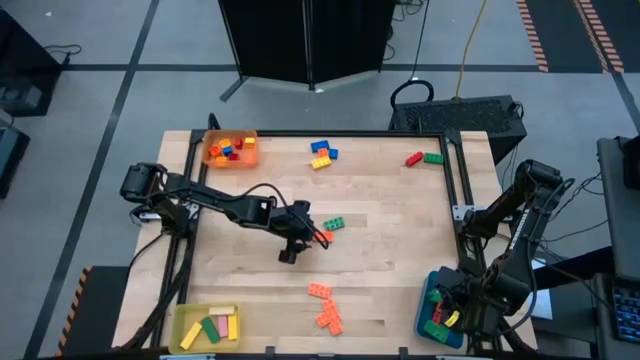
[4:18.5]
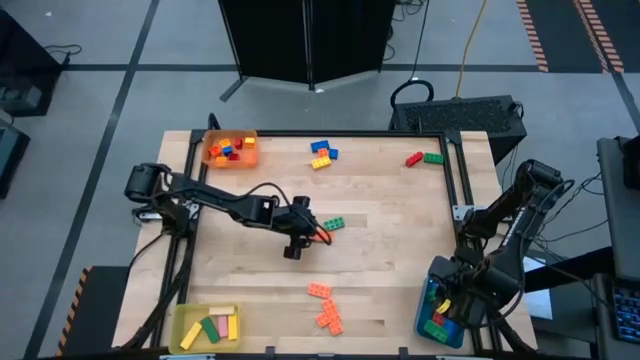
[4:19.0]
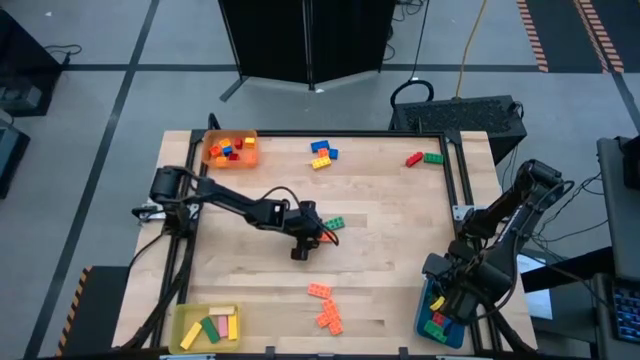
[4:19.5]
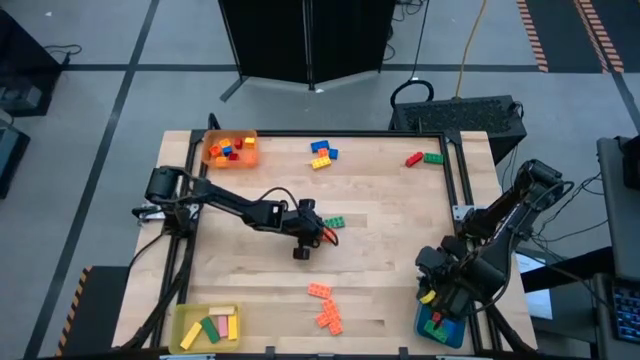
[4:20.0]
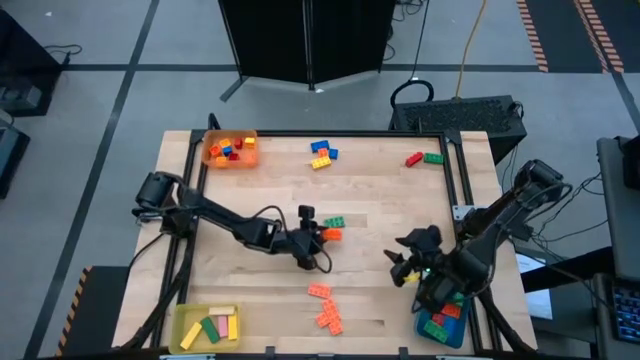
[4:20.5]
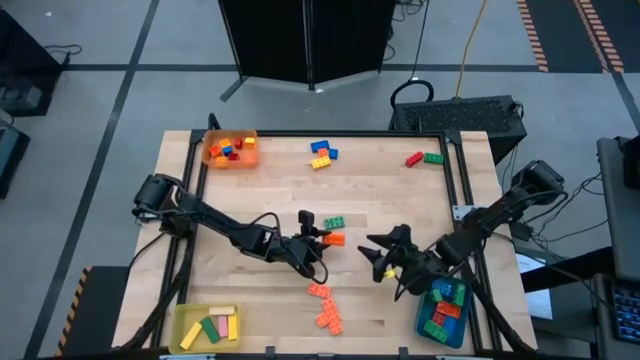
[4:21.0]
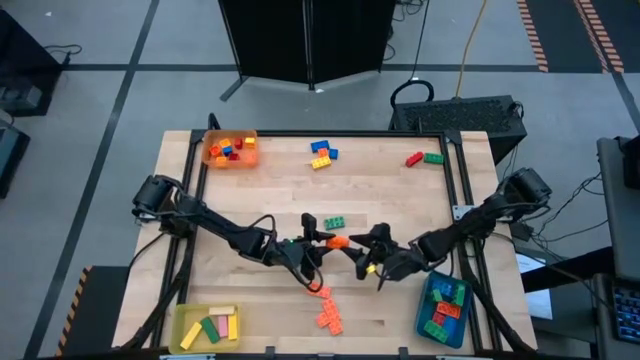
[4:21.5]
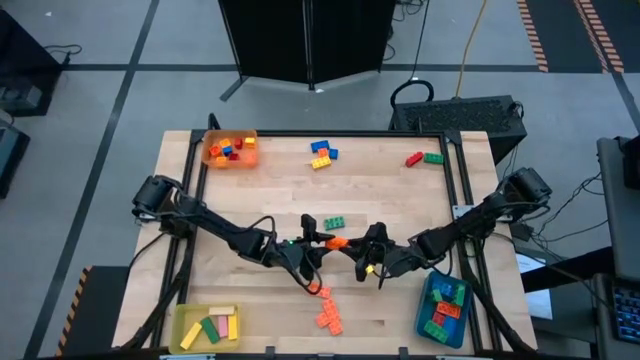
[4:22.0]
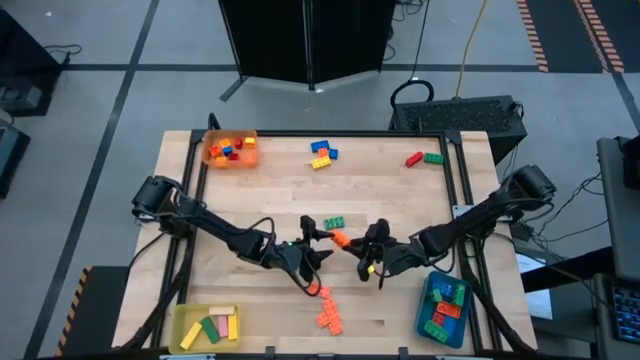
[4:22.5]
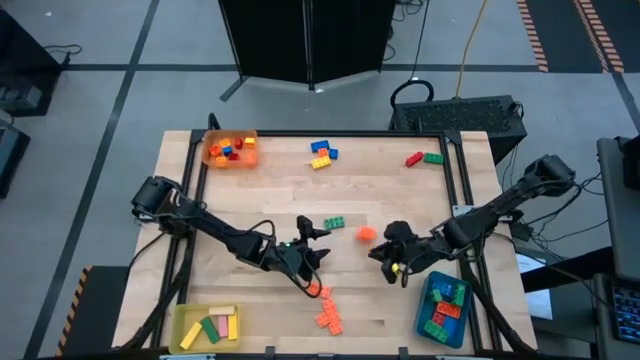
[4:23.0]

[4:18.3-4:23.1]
Task: Sort blocks by size
Put the orange 8 stud game piece into the blue bin

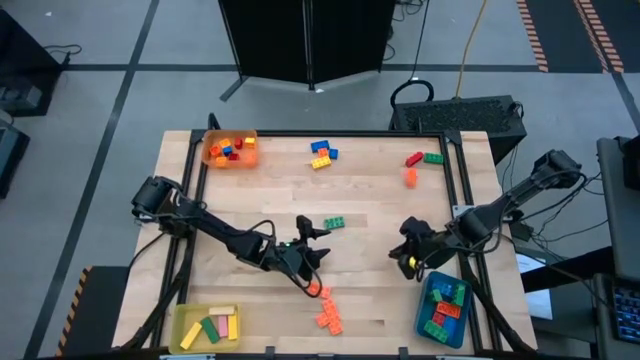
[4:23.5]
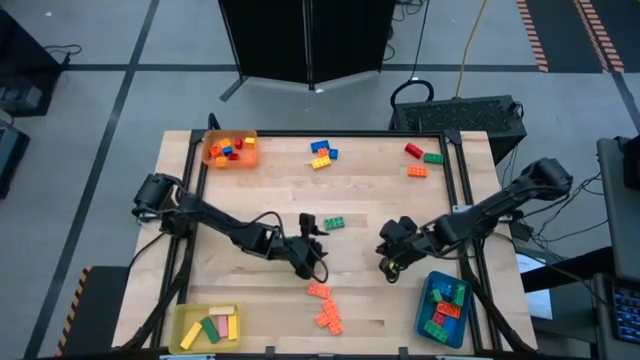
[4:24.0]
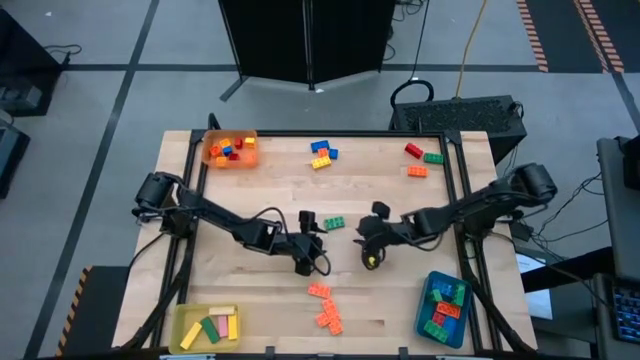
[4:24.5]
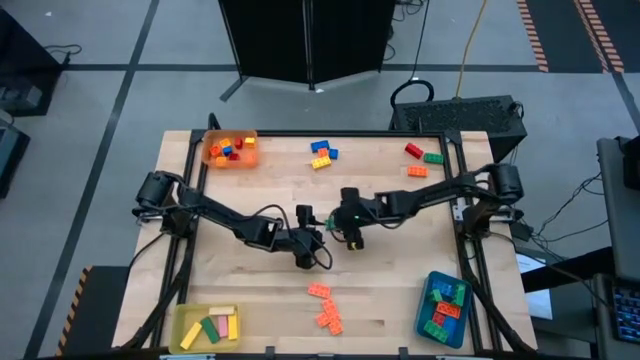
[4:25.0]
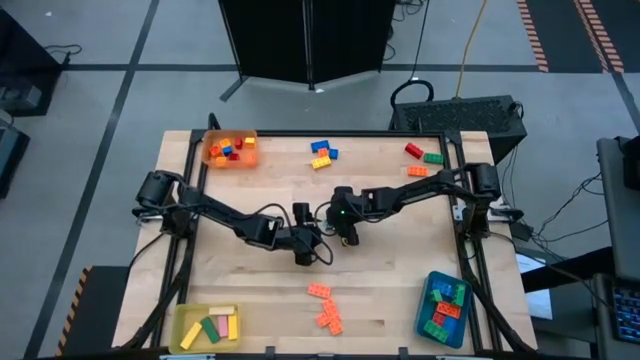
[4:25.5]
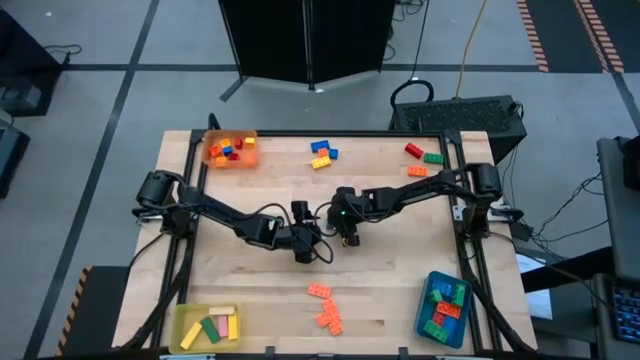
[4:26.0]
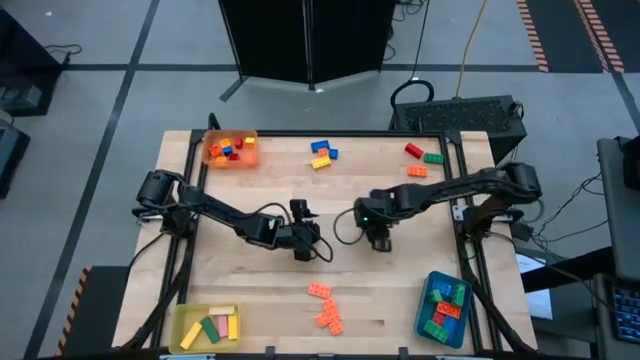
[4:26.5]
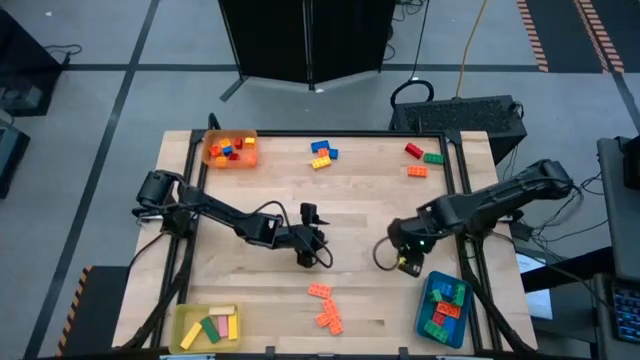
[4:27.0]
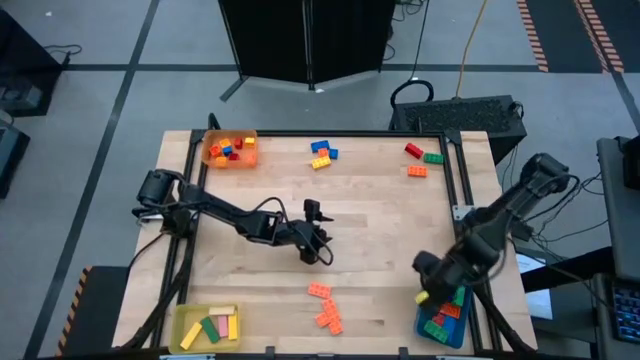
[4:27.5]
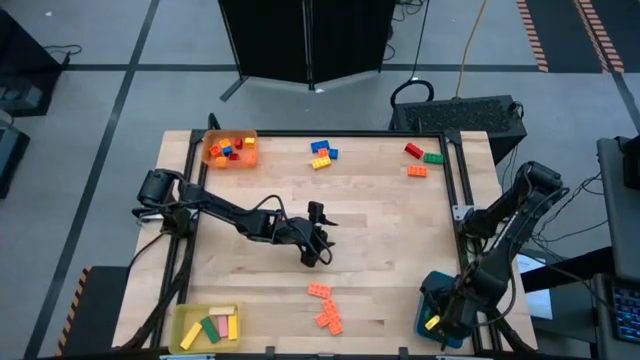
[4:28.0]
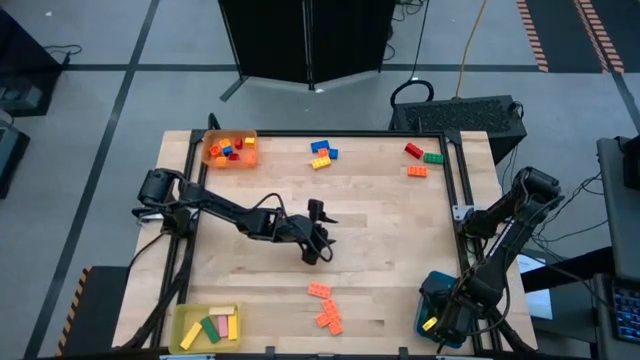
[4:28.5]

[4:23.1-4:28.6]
Put the green 8 stud game piece into the blue bin

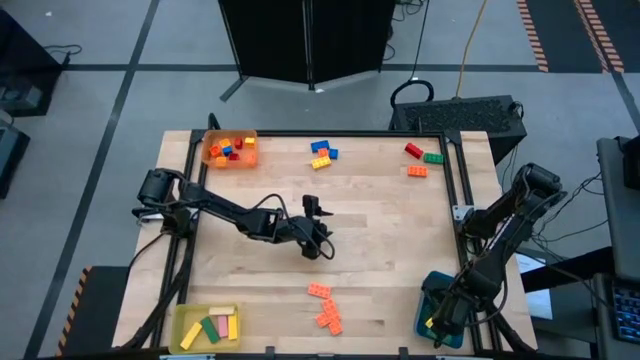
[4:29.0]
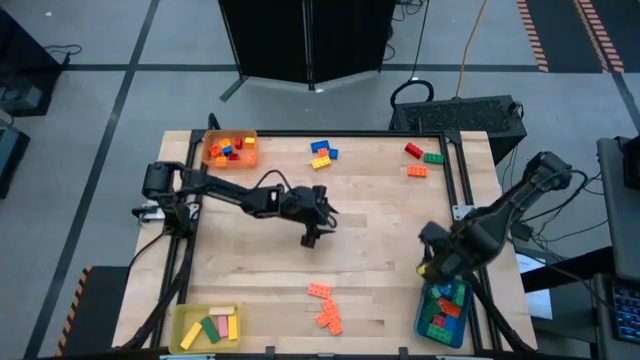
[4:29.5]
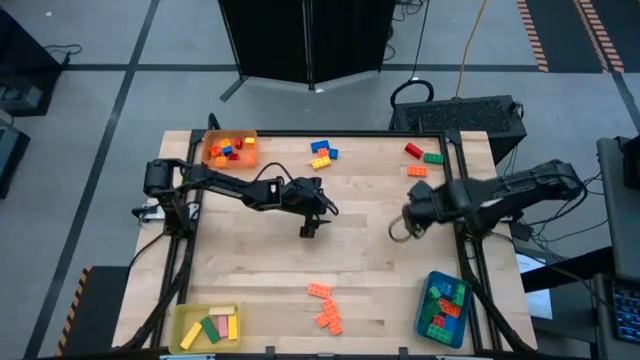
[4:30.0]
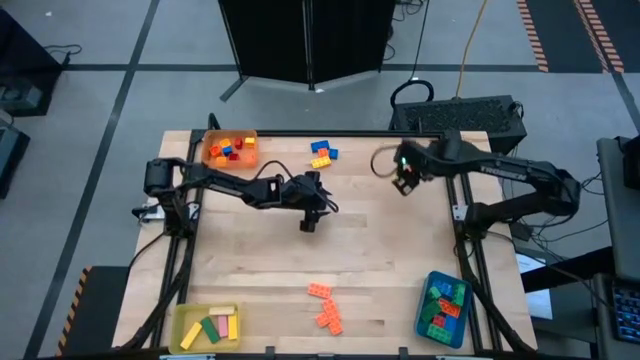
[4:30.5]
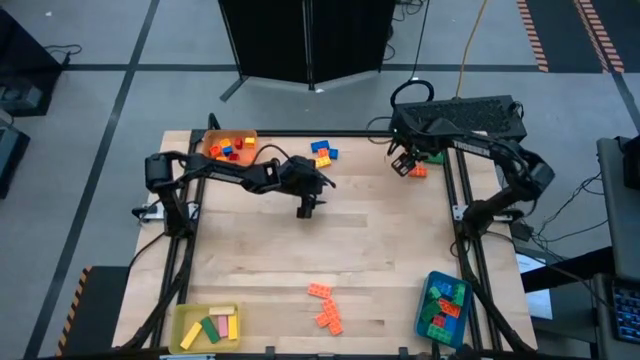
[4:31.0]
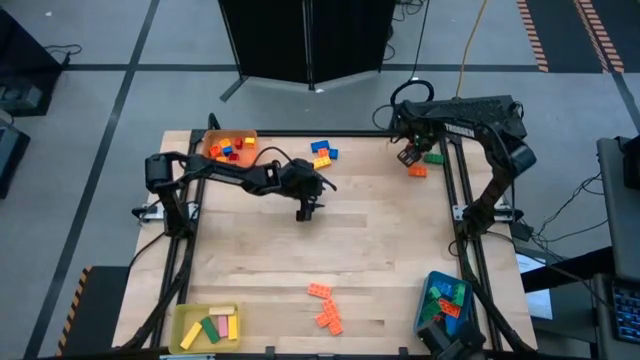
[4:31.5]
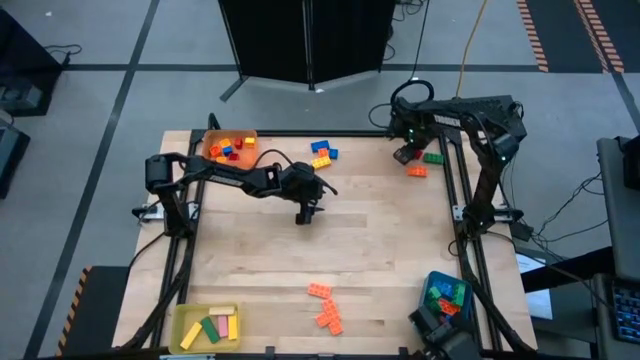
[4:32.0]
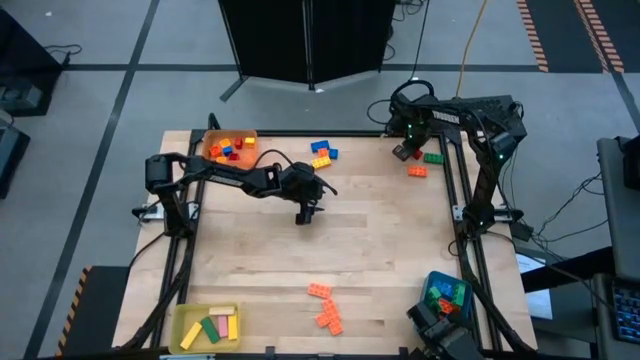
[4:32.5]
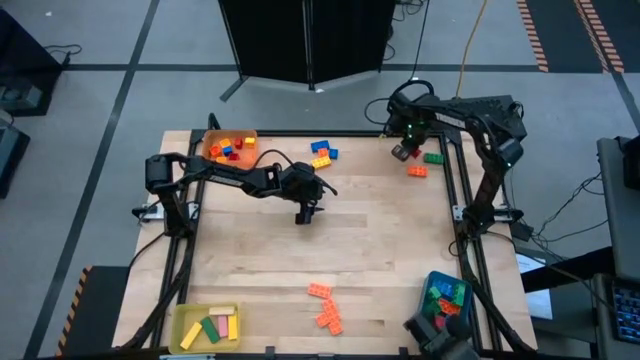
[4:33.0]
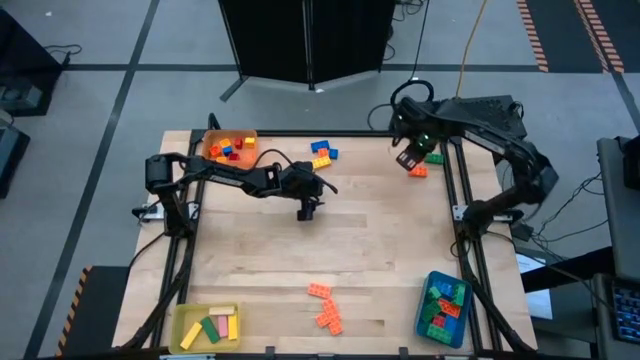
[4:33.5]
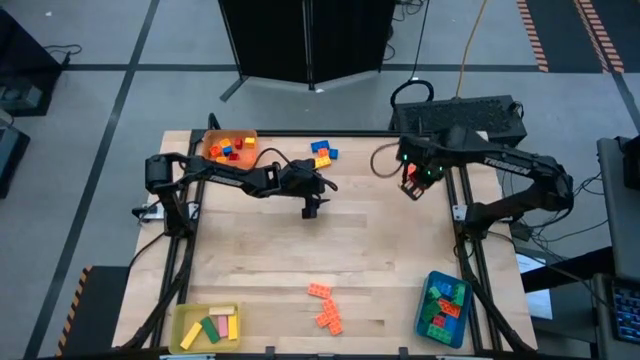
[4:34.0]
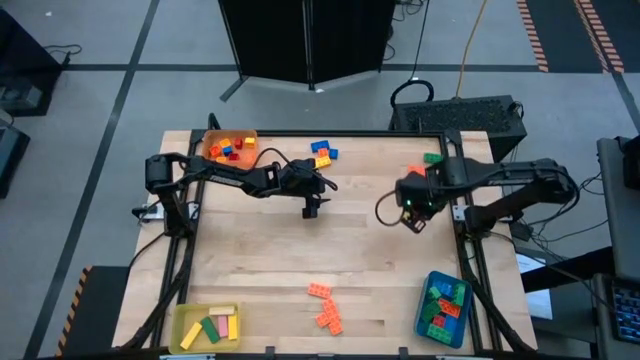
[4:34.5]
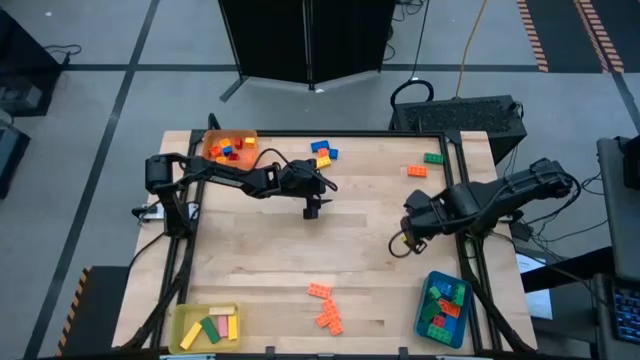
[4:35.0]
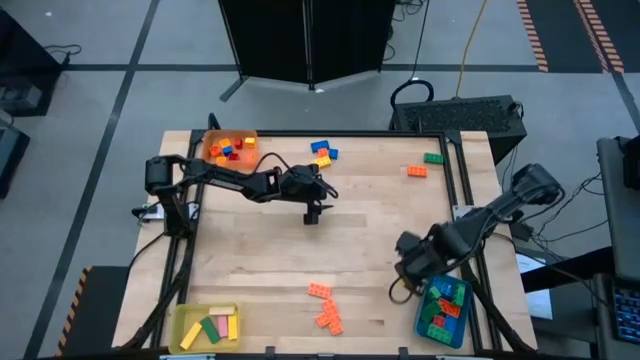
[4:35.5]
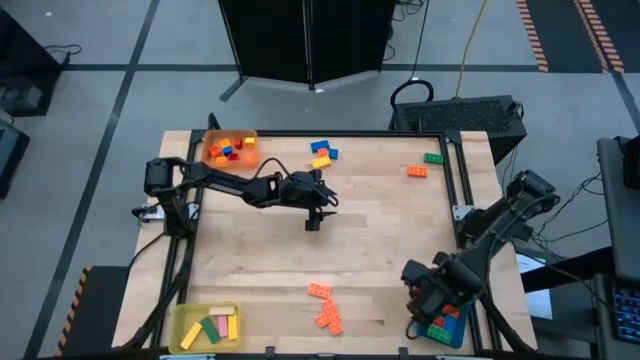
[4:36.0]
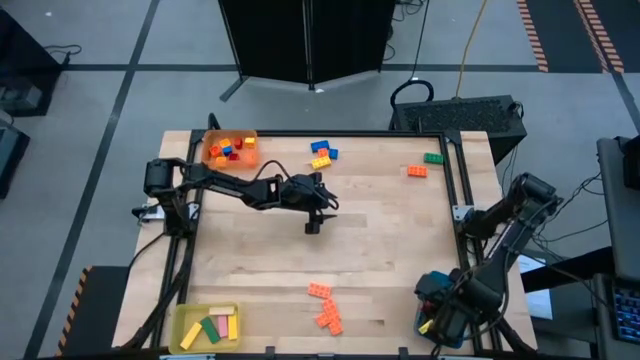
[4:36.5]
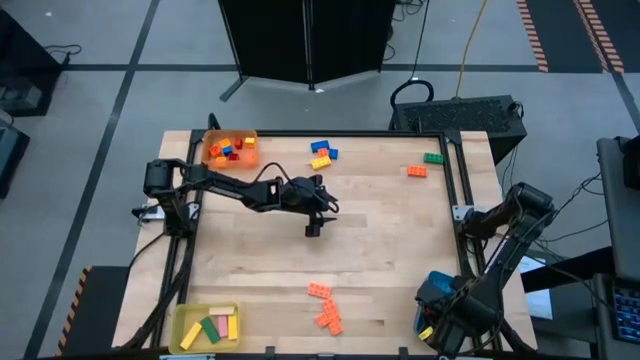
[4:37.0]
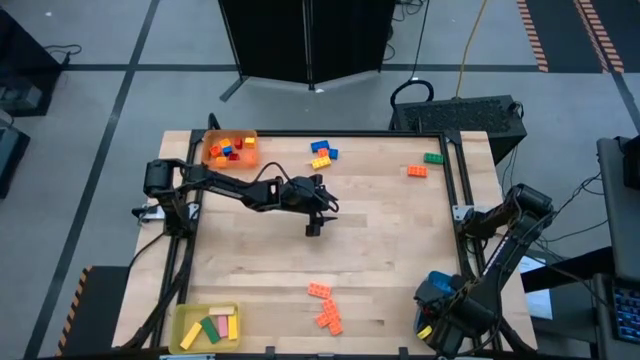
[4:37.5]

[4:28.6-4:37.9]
Put the red 8 stud game piece into the blue bin

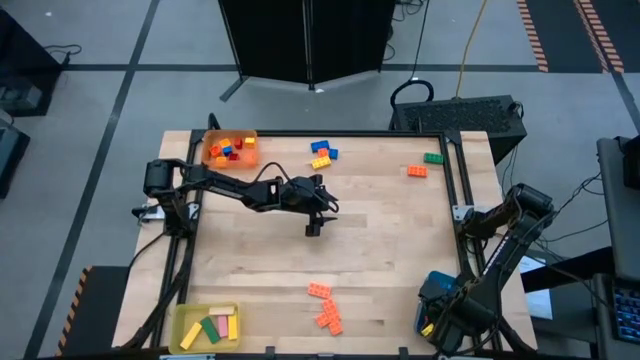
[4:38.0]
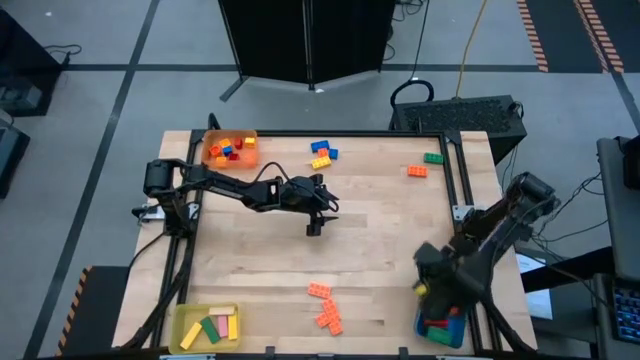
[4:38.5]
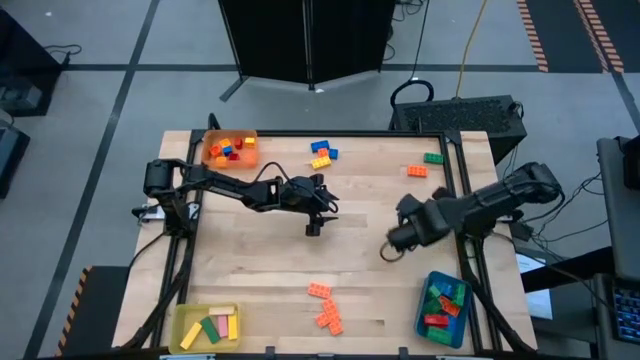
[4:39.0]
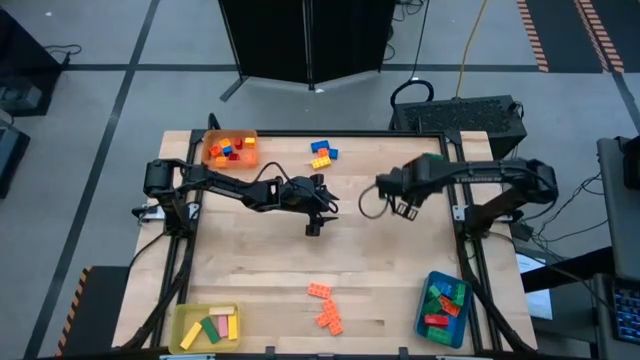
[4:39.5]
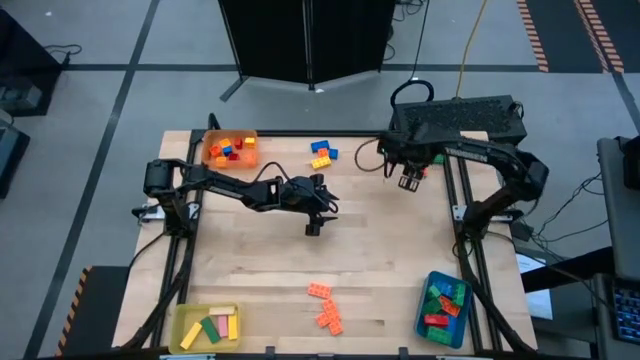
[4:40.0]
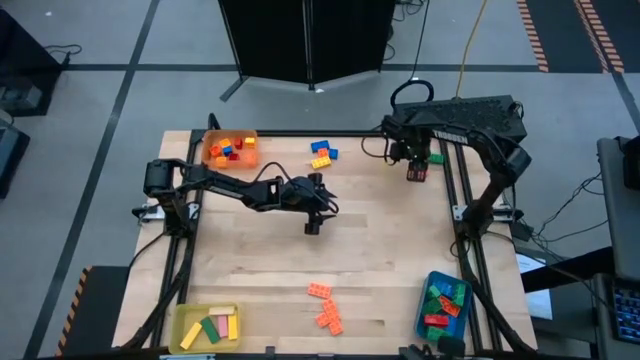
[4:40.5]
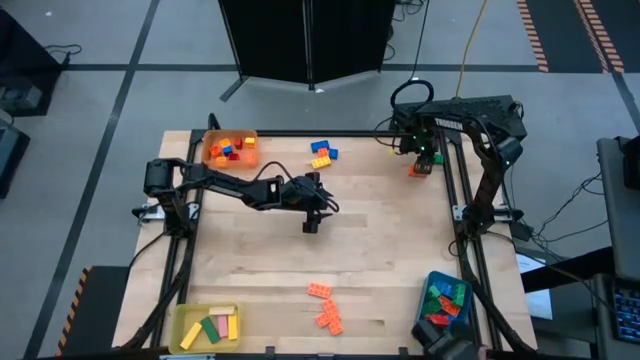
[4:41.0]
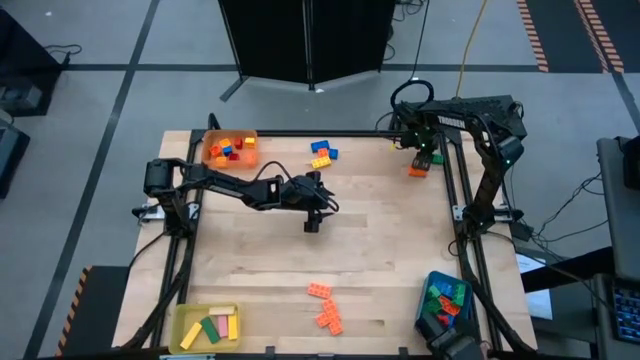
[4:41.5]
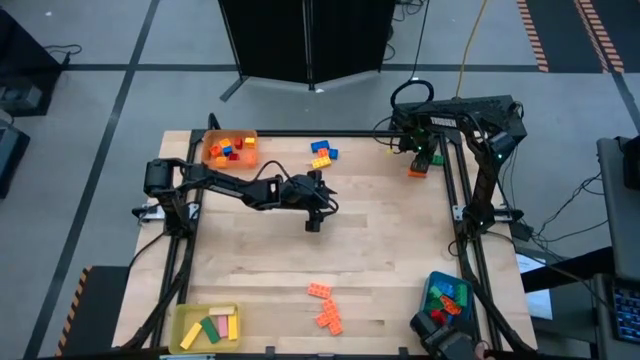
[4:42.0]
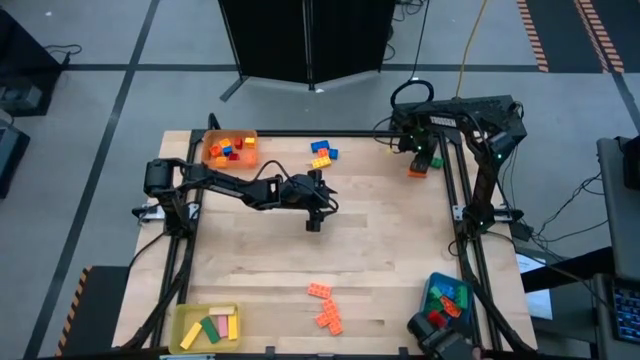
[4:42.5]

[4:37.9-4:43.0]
Put the green 8 stud game piece into the blue bin
